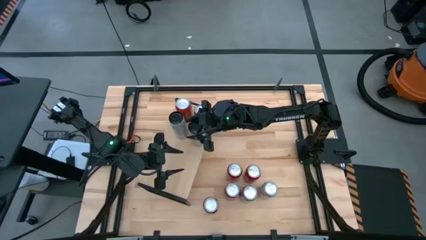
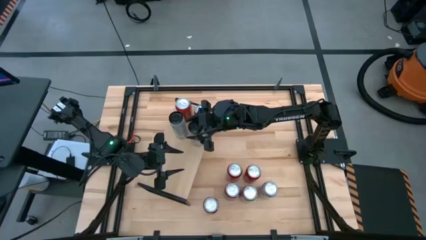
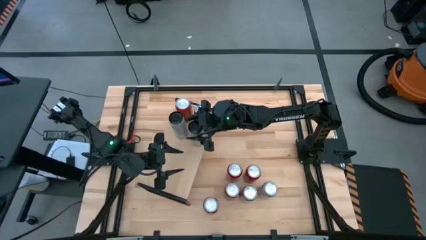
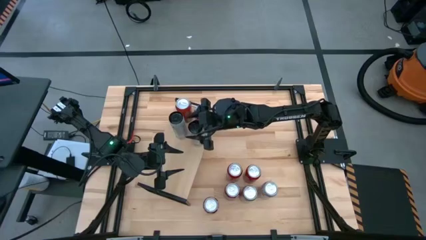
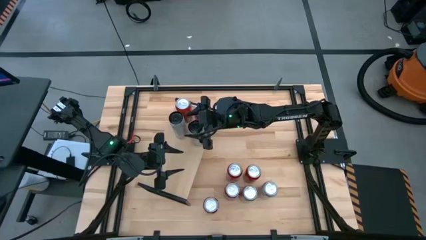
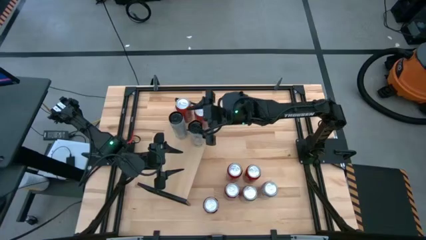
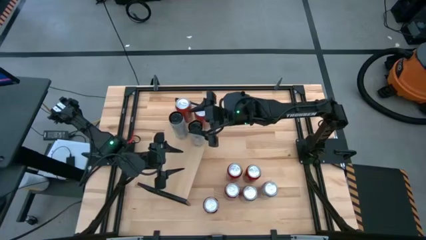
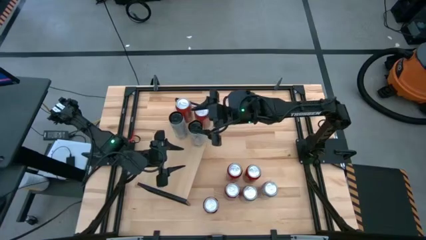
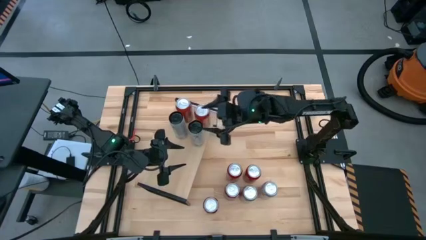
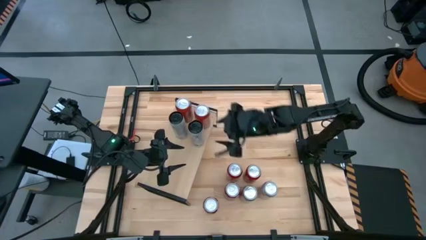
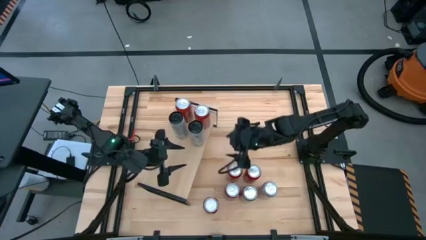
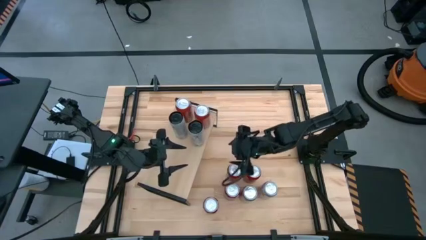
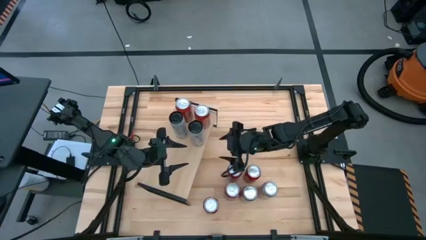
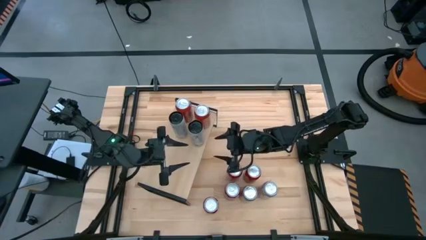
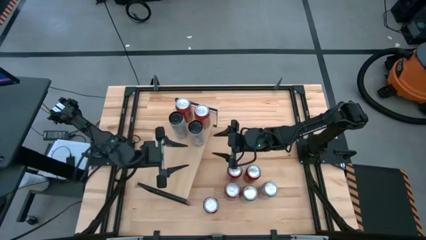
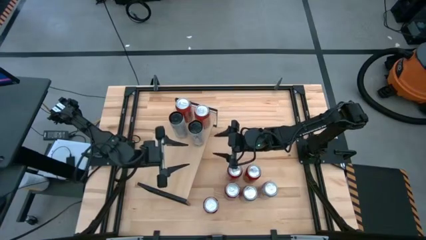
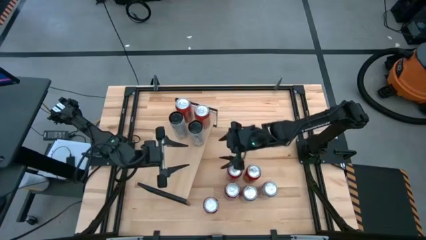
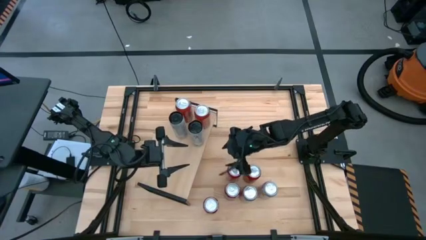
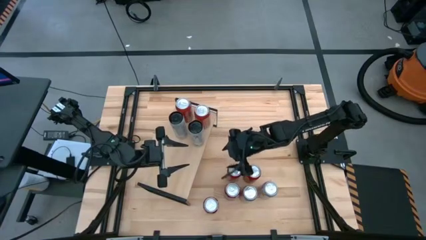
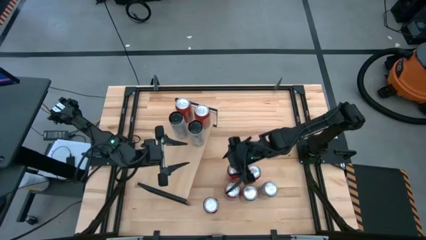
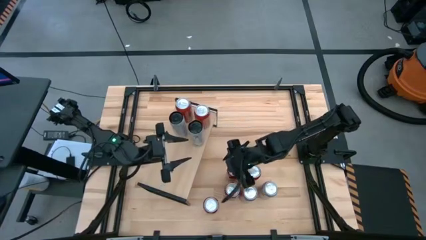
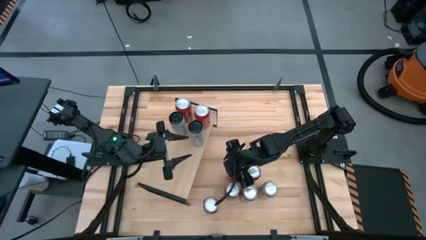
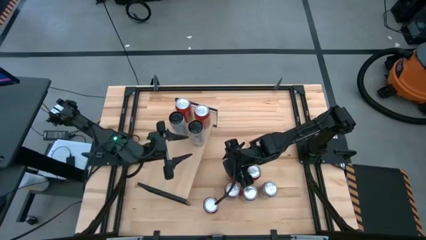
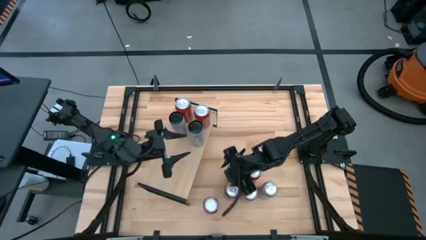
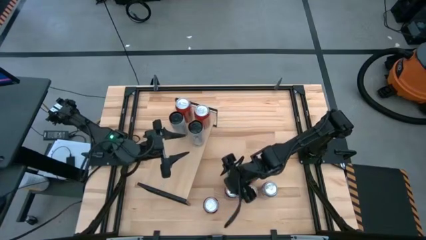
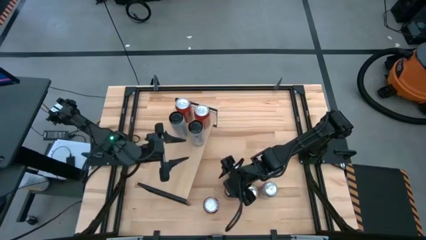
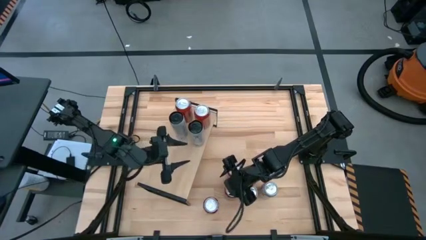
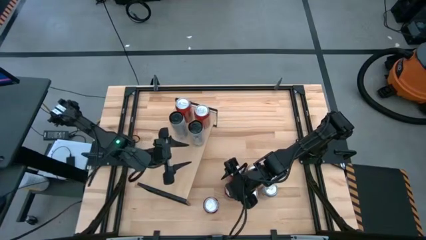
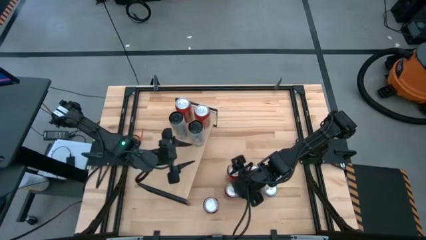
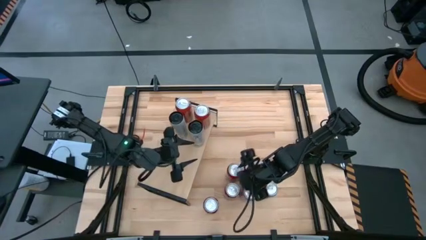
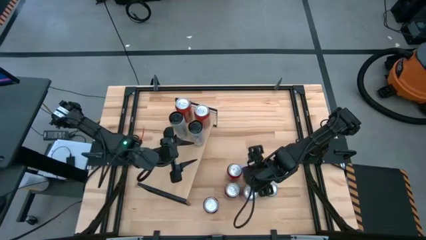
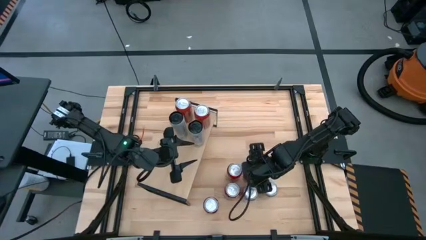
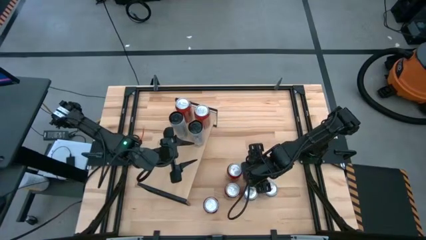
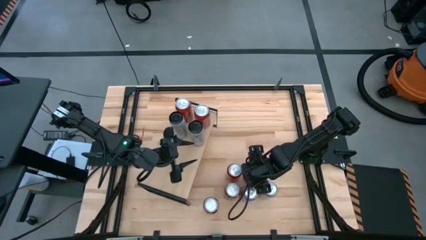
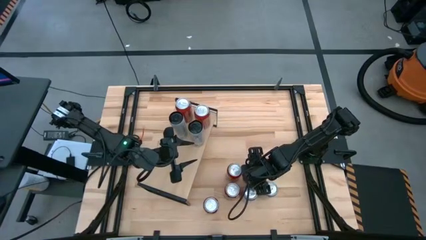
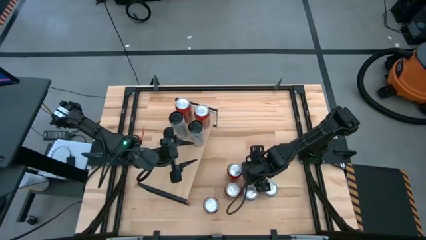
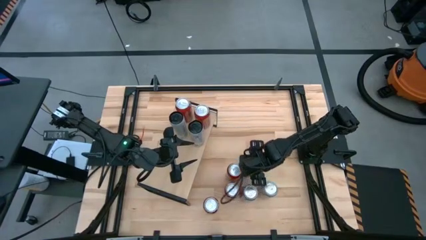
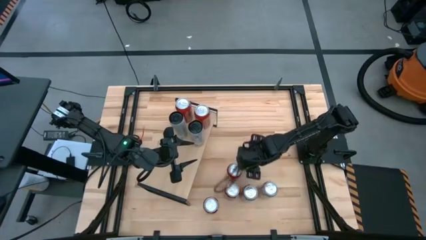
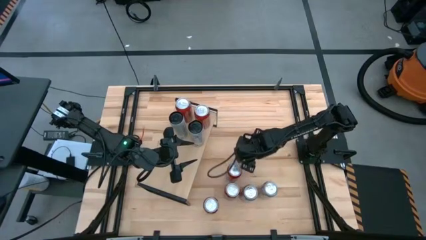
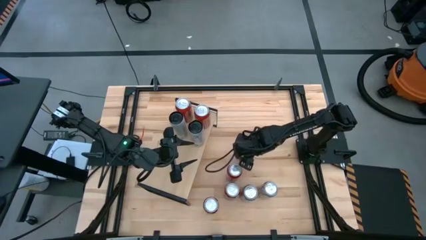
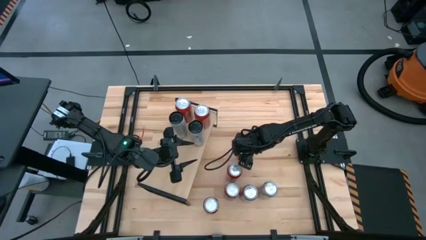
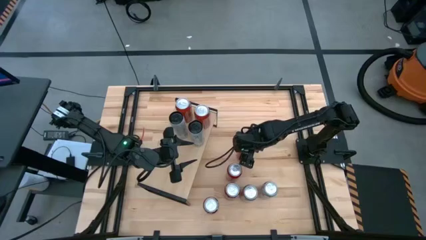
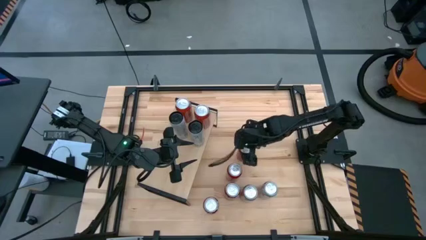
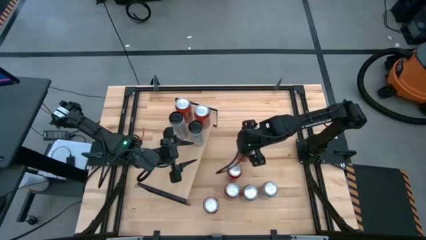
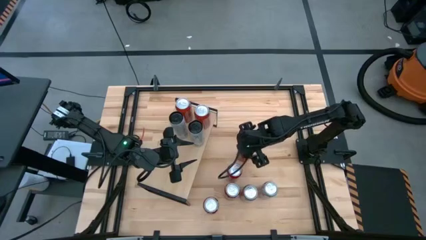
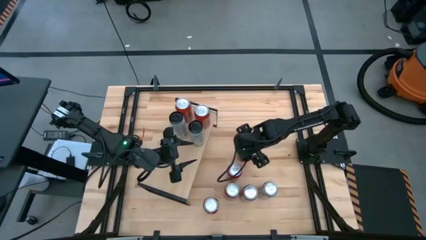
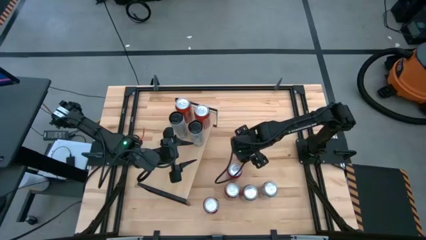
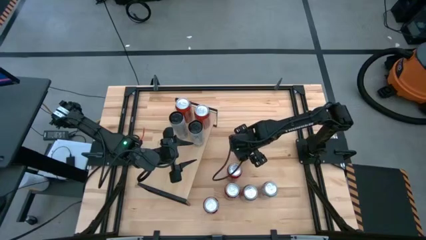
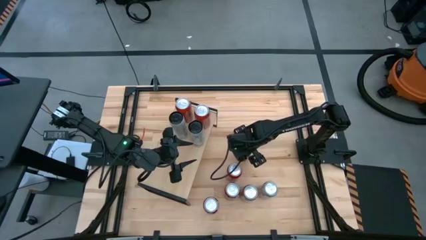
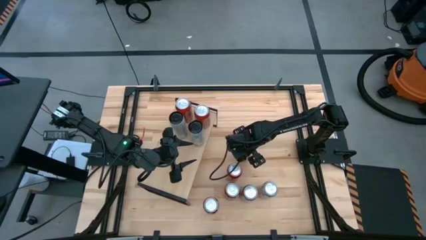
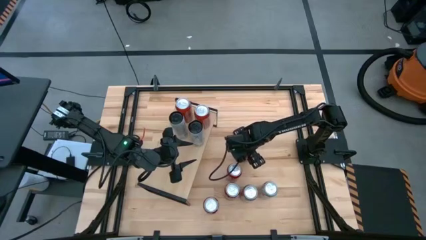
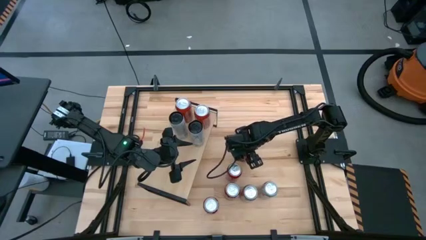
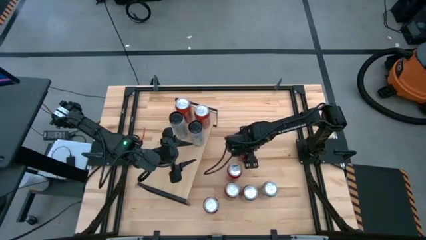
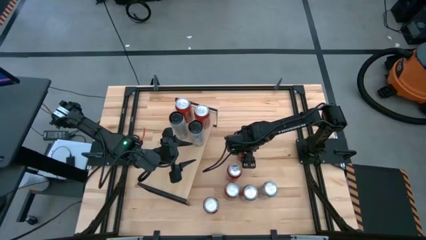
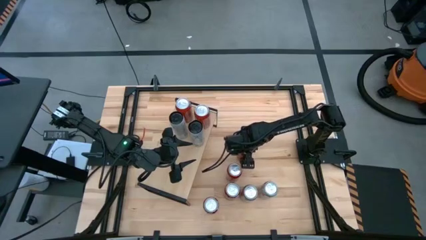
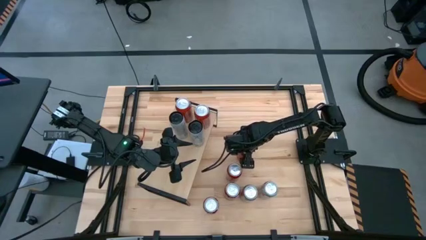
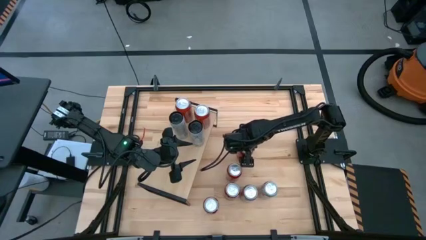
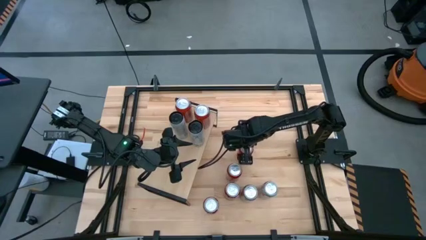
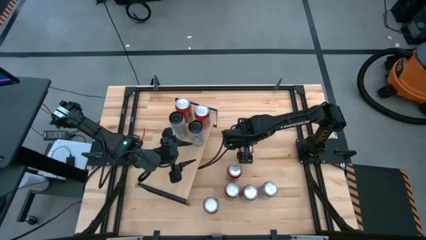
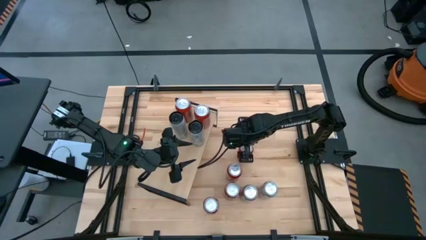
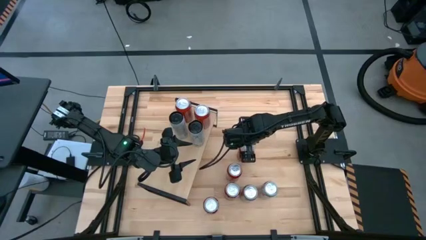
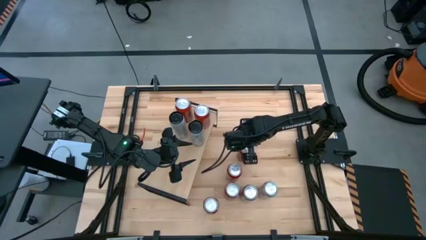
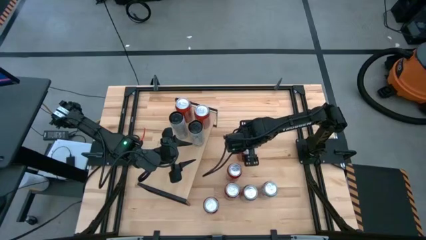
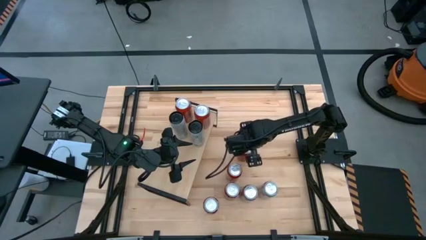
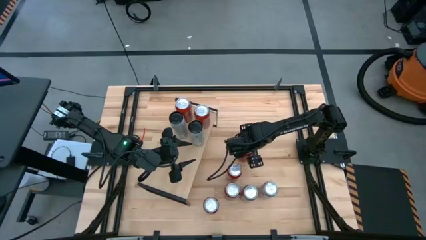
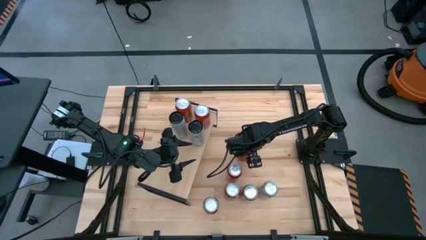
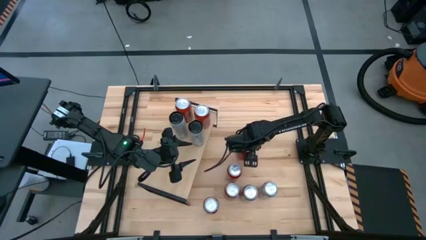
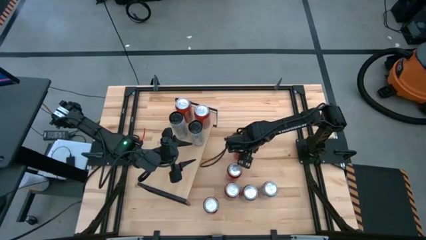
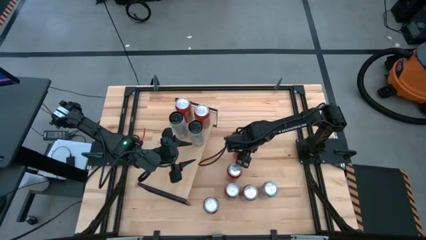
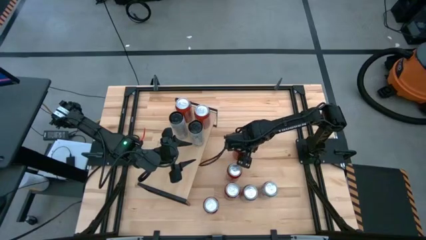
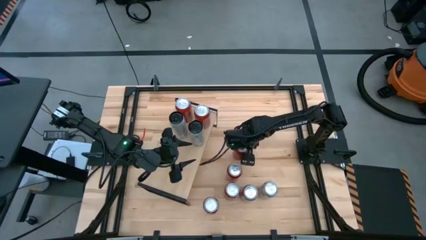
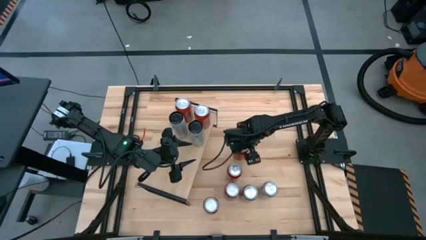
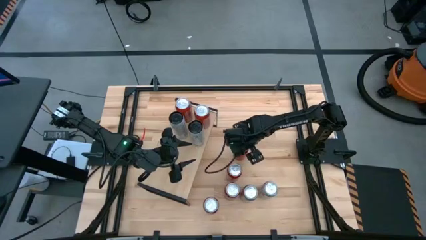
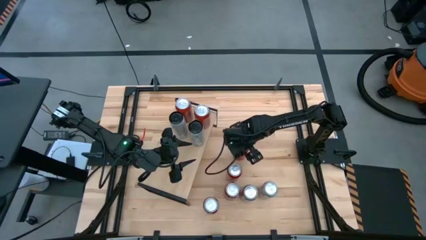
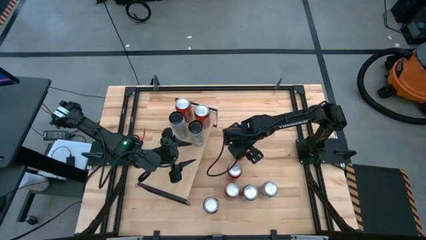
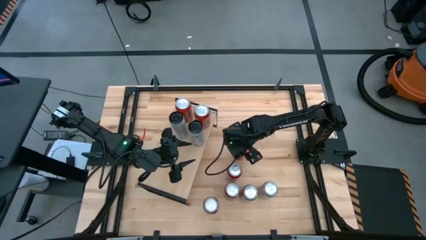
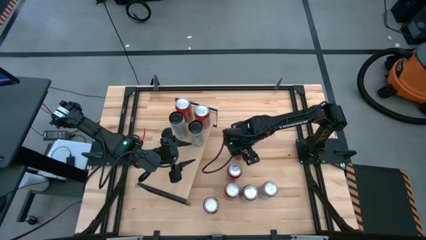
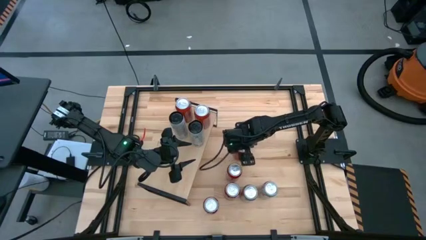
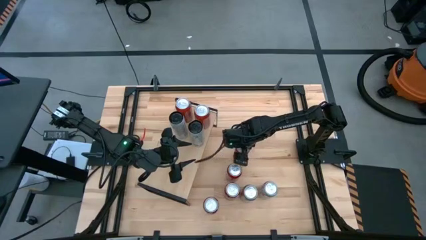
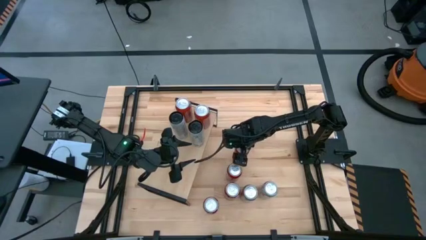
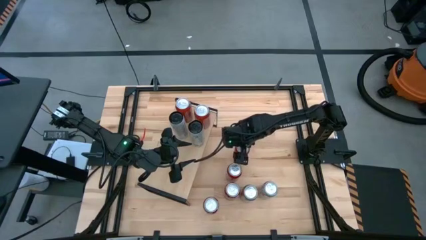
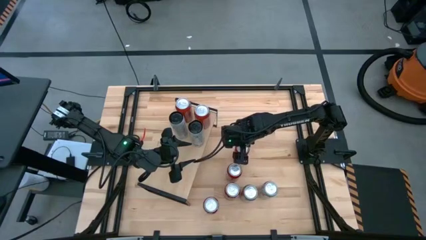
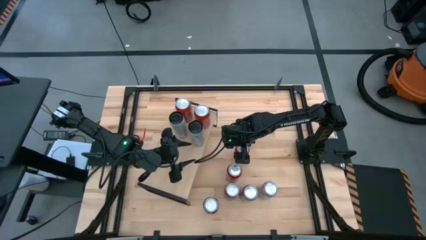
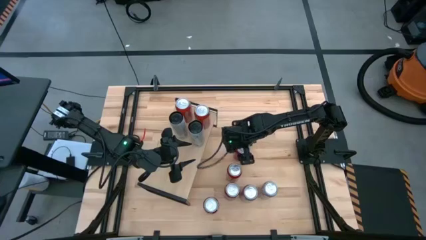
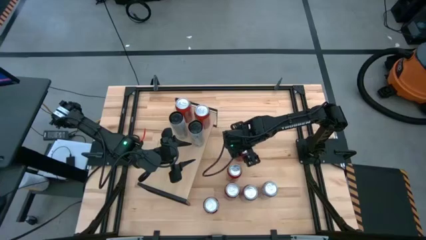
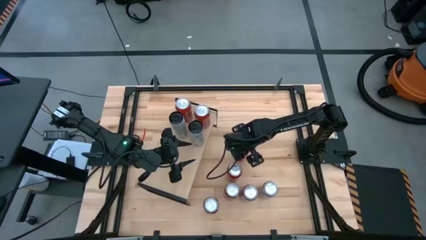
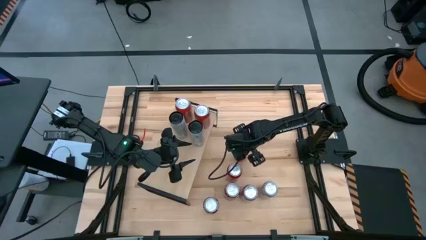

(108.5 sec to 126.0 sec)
Task: Place canned beverage on shelf
Put the top red soda can on the shelf
